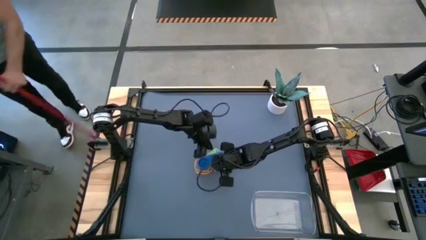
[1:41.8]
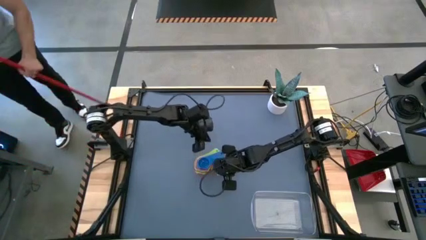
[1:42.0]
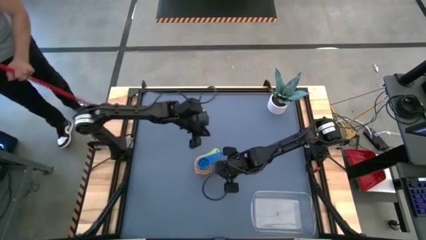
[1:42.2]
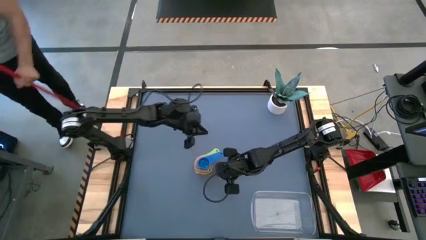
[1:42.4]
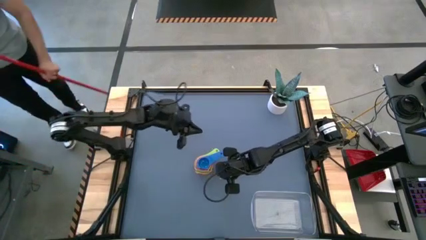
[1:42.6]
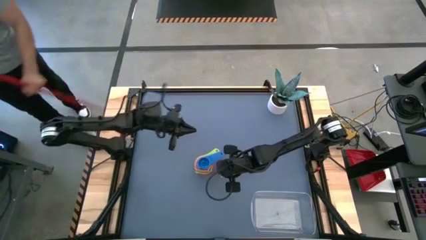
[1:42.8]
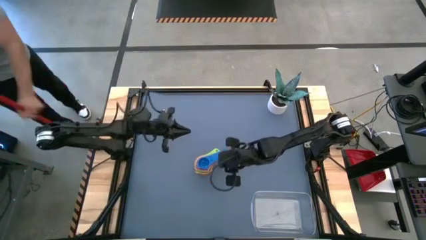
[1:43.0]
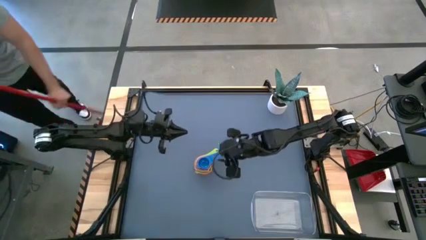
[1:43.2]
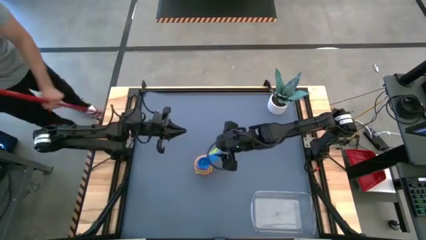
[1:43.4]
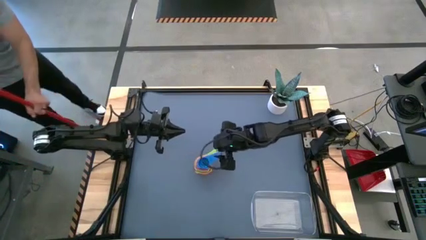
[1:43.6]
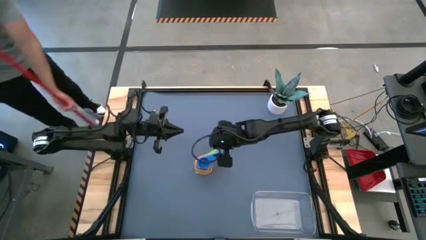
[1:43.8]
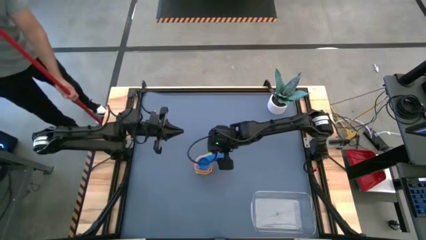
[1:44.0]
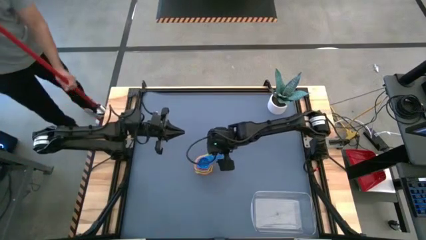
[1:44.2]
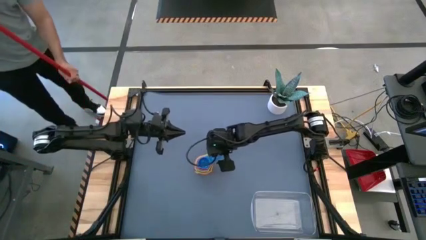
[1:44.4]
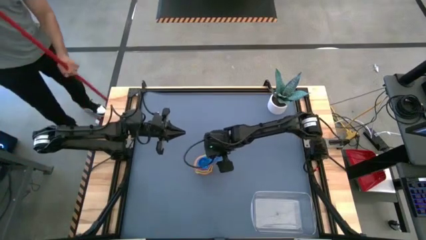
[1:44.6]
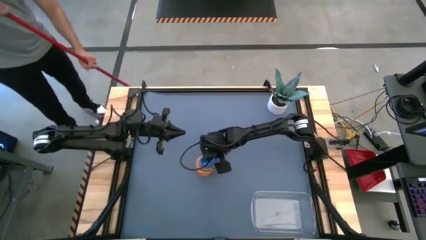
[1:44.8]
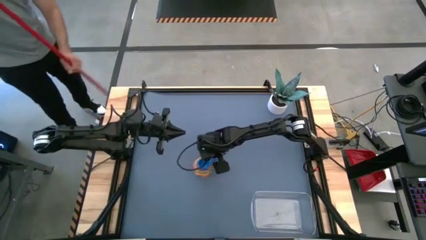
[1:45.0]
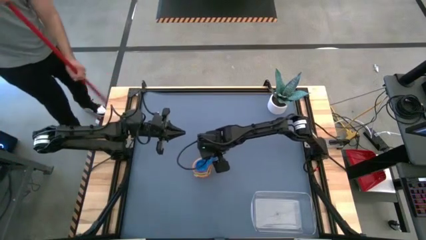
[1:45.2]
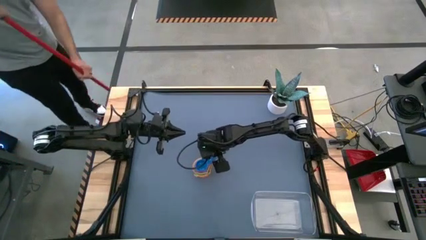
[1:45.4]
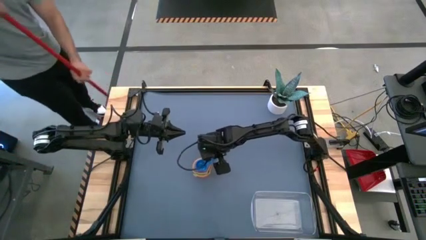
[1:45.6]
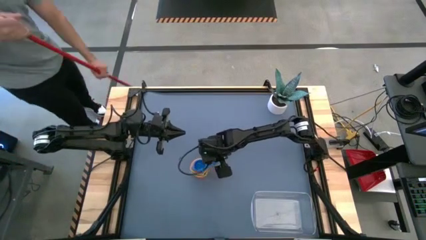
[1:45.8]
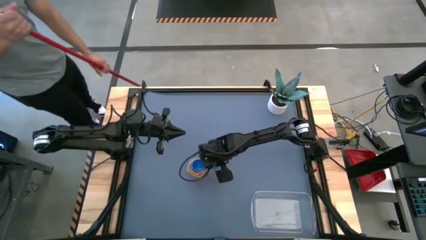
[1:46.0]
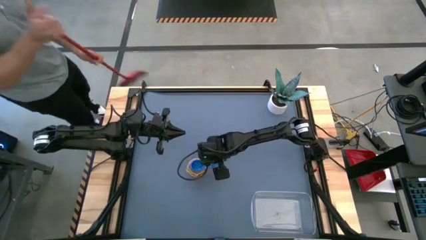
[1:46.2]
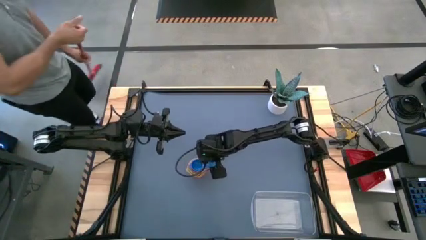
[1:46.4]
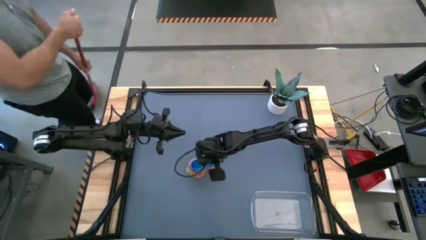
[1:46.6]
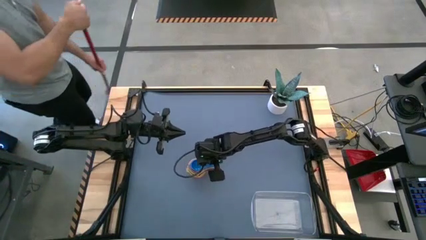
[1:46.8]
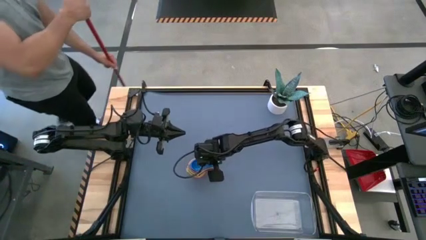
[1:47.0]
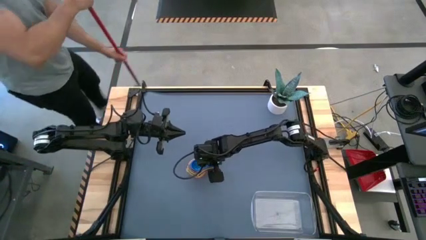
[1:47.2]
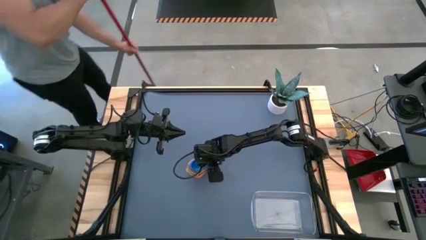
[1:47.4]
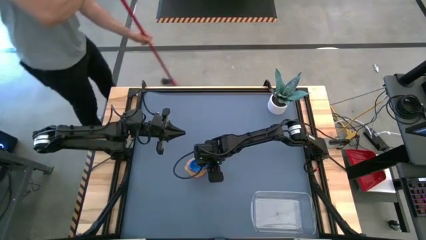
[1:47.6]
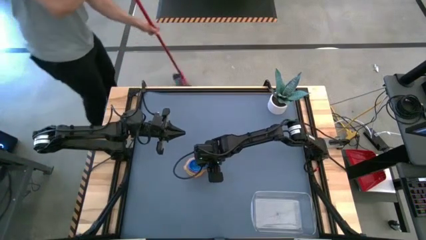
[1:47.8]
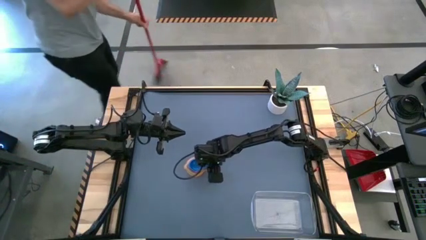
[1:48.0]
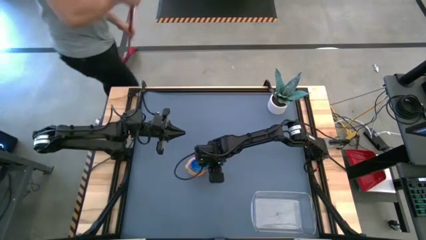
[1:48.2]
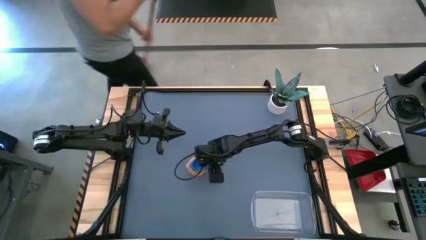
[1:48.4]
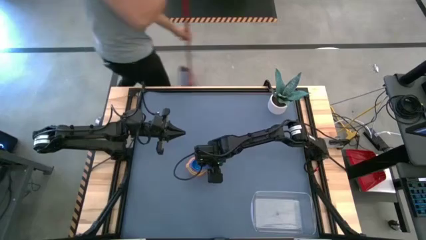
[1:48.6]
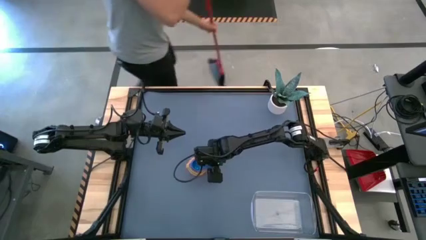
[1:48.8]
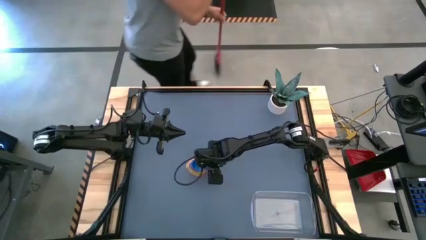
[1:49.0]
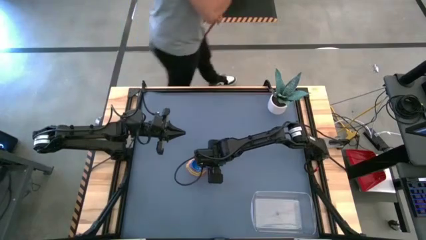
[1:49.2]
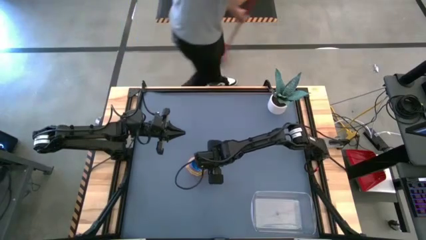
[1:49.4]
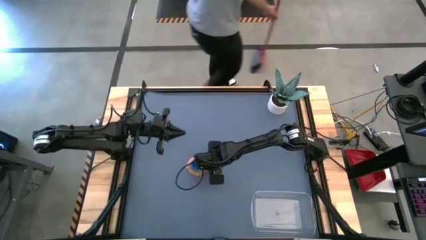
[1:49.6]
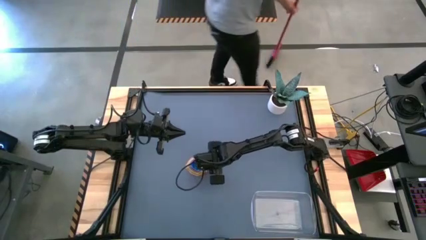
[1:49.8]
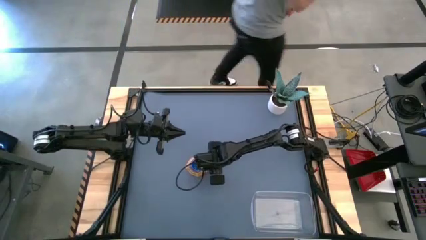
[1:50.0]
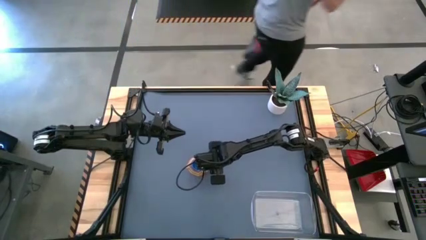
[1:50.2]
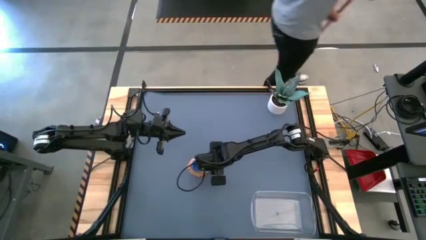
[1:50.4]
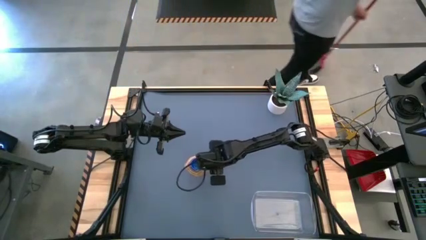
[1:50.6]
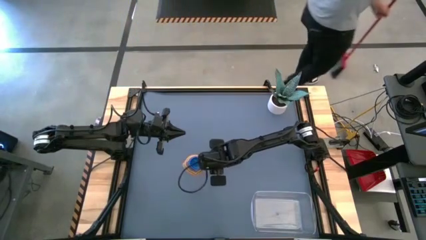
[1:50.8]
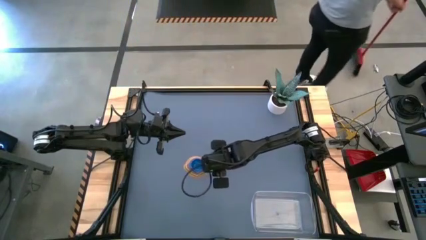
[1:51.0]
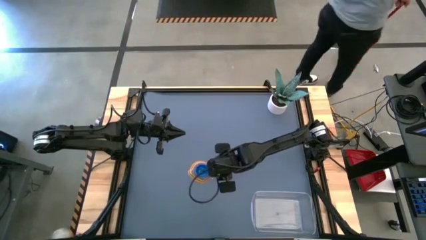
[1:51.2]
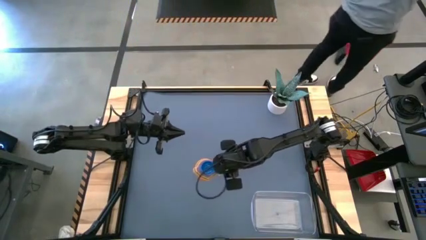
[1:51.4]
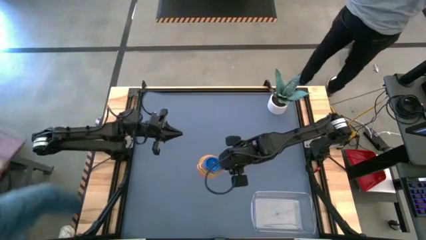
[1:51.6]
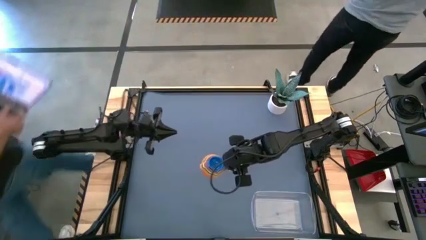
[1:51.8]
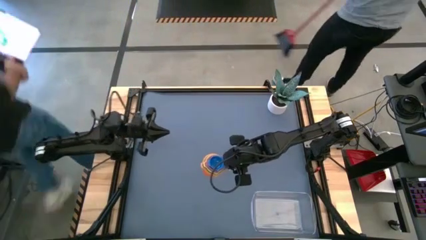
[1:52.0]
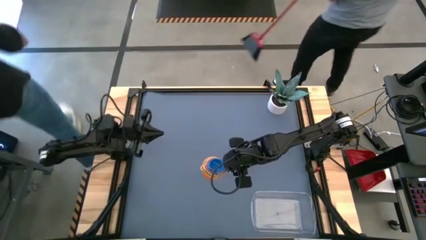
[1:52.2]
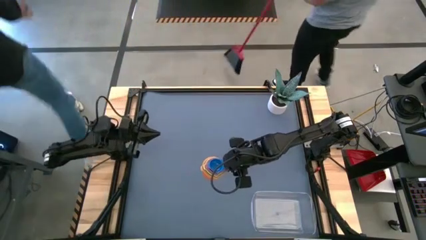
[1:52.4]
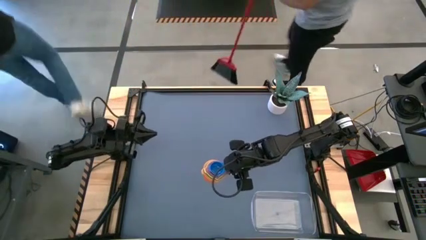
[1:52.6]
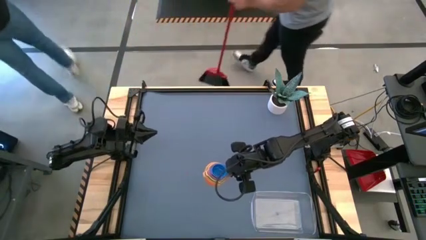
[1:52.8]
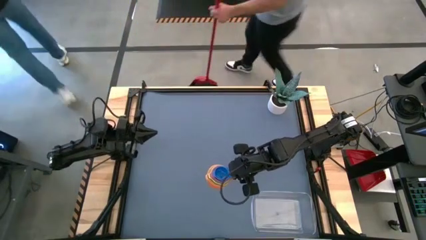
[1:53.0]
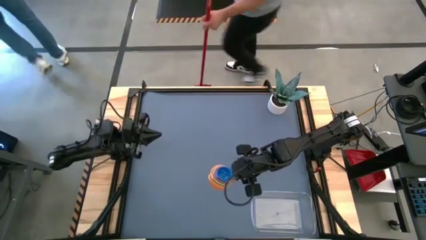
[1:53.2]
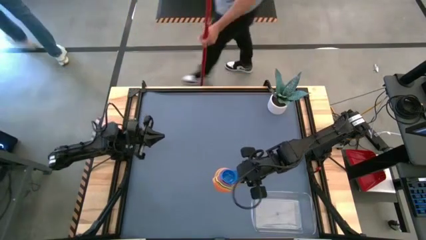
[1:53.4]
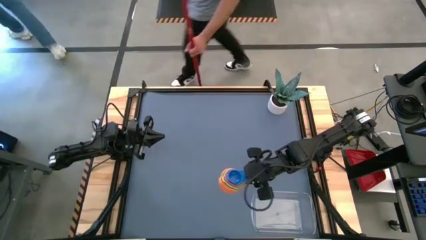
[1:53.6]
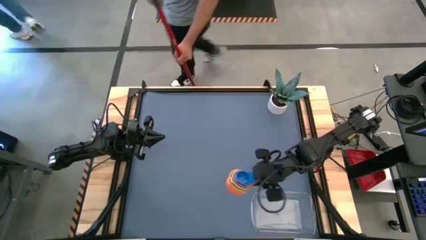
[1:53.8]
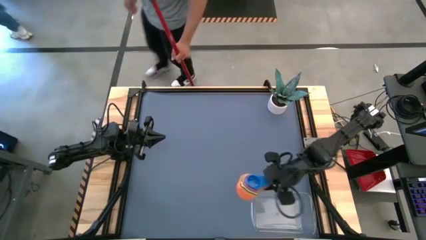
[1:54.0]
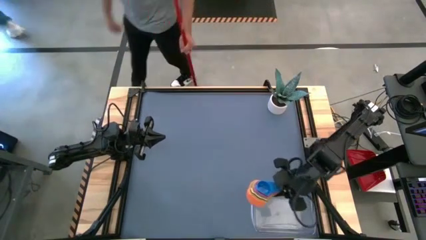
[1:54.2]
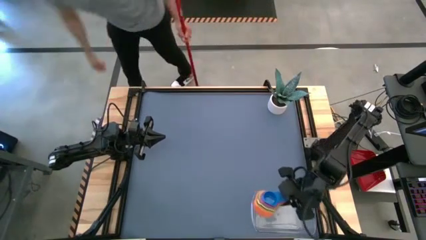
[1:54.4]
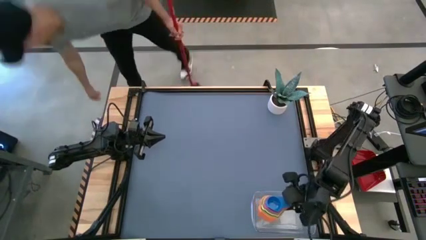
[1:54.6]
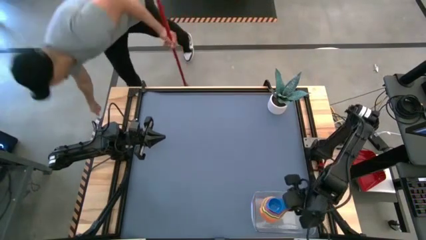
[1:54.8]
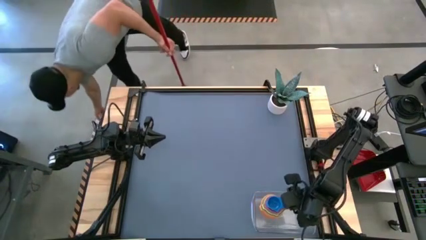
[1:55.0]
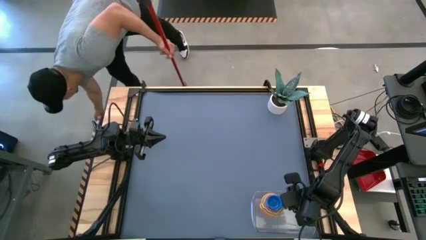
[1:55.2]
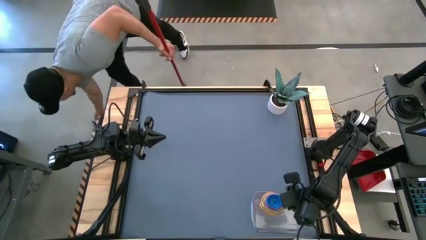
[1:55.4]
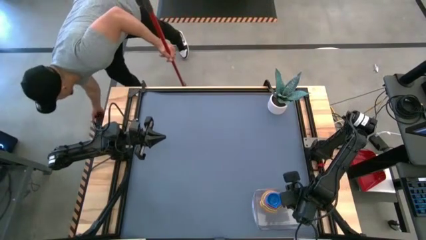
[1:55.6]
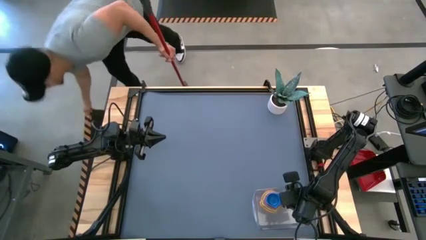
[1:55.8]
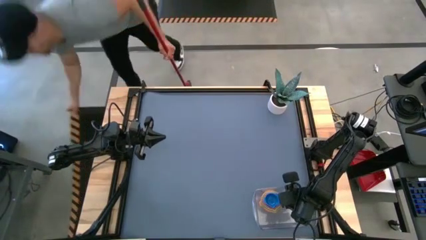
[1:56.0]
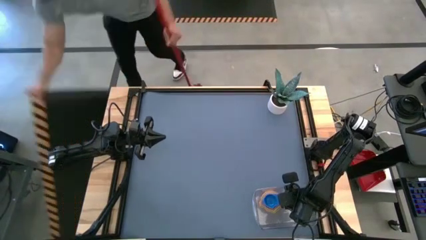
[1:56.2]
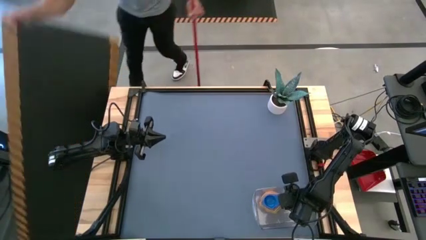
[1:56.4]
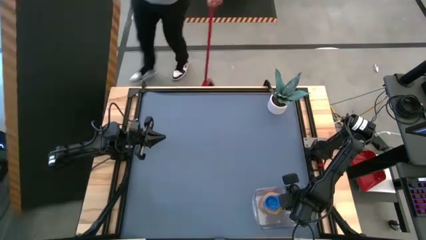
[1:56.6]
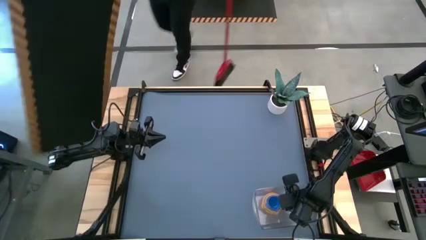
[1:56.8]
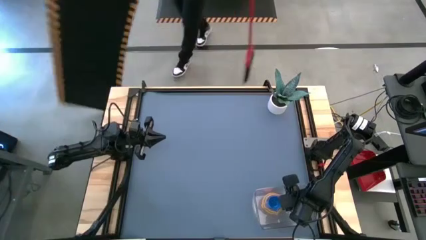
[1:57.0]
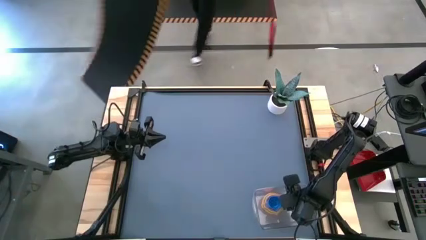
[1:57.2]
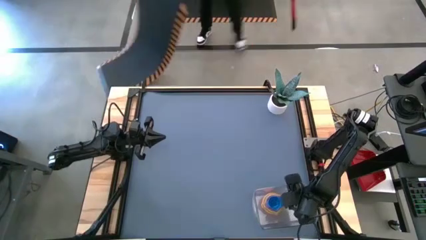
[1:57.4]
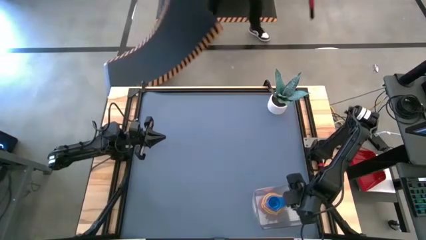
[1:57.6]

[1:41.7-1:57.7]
Task: Nest measuring cups in basket
Put the nested measuring cups into the transparent bin
